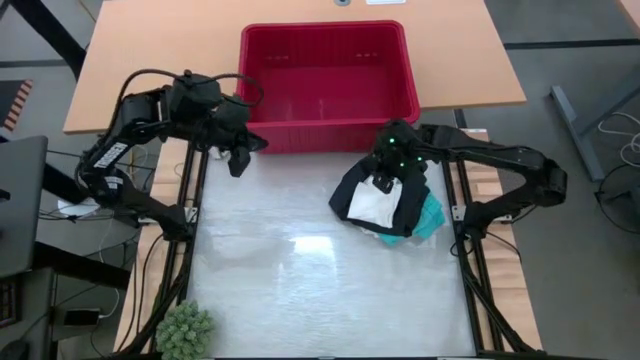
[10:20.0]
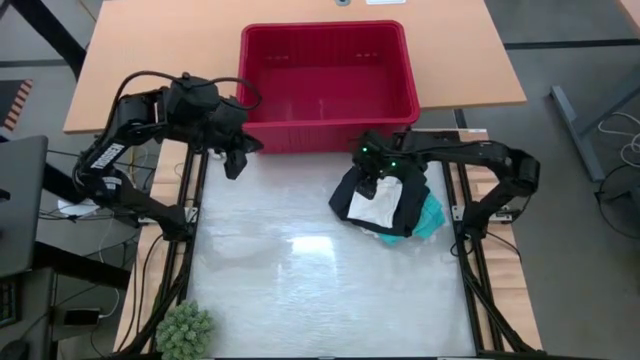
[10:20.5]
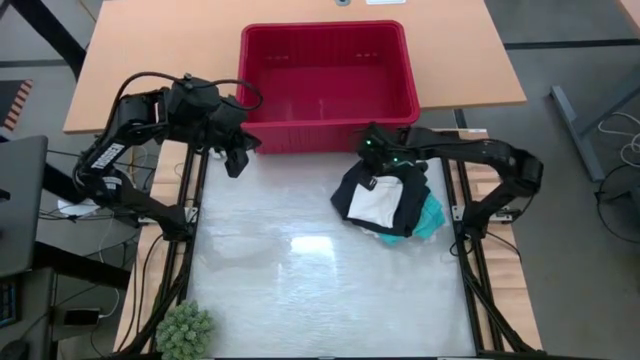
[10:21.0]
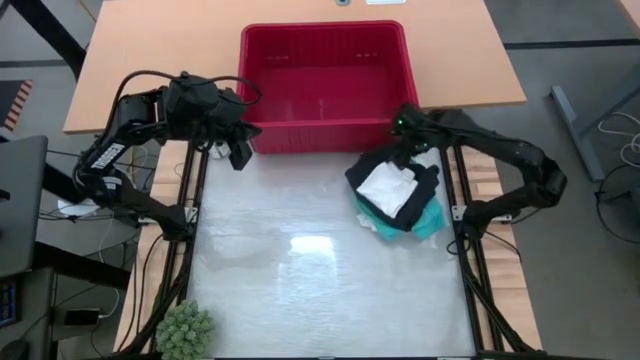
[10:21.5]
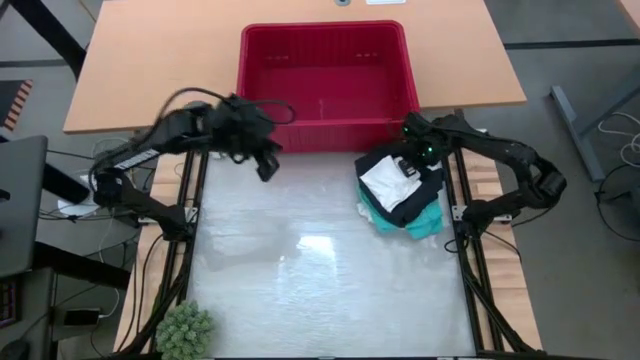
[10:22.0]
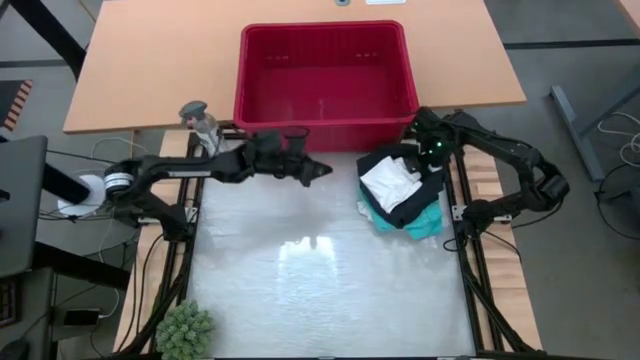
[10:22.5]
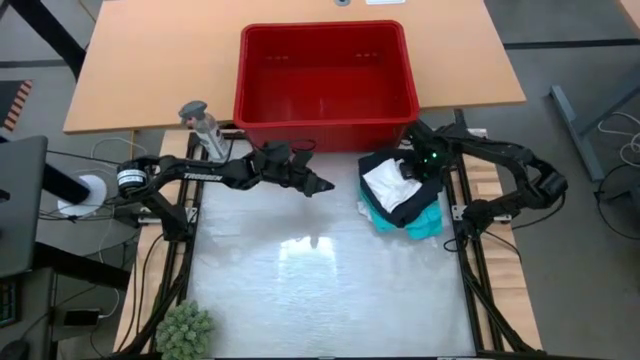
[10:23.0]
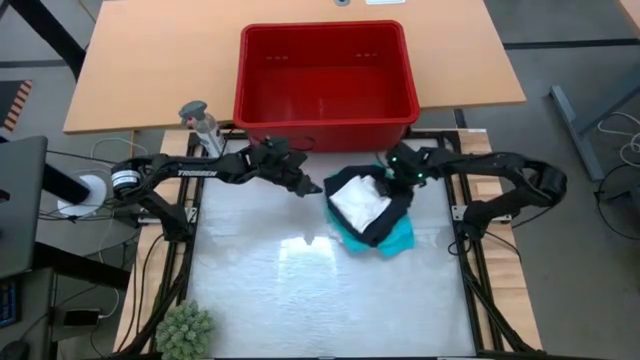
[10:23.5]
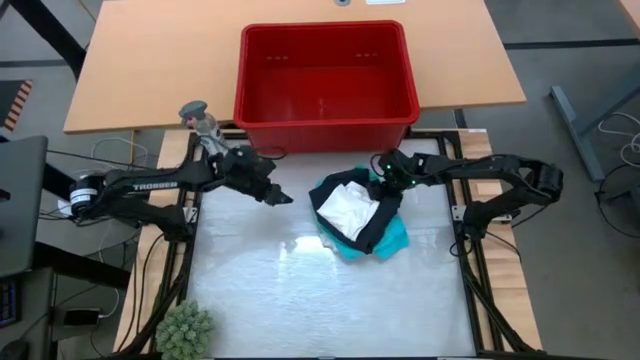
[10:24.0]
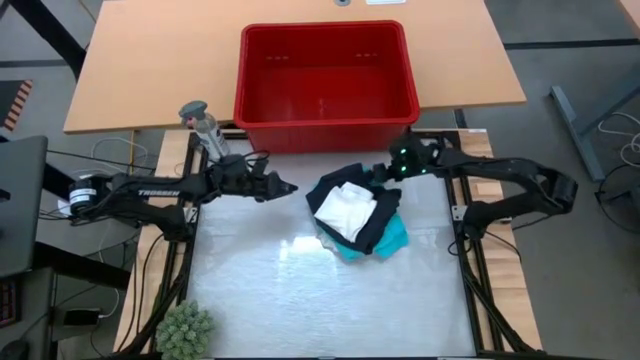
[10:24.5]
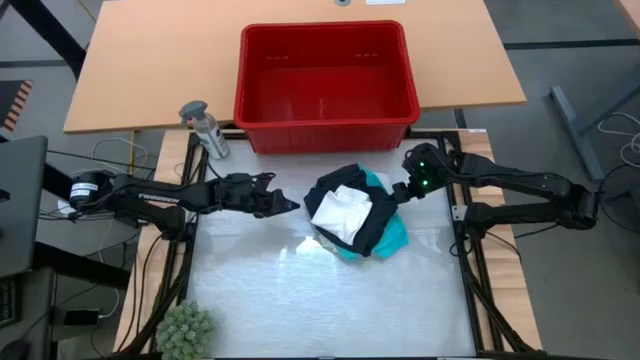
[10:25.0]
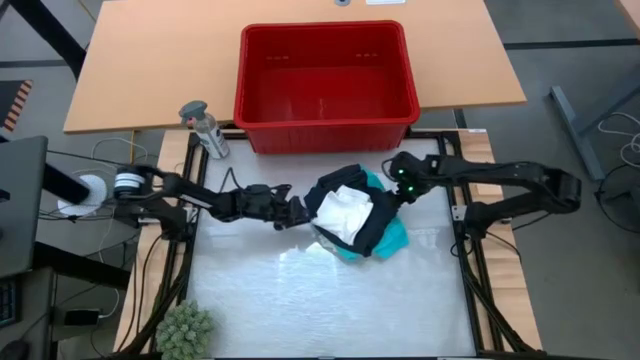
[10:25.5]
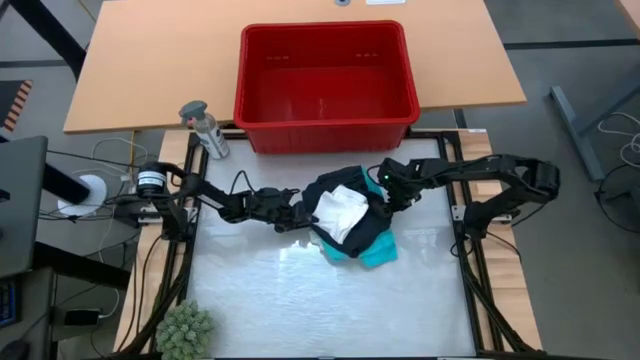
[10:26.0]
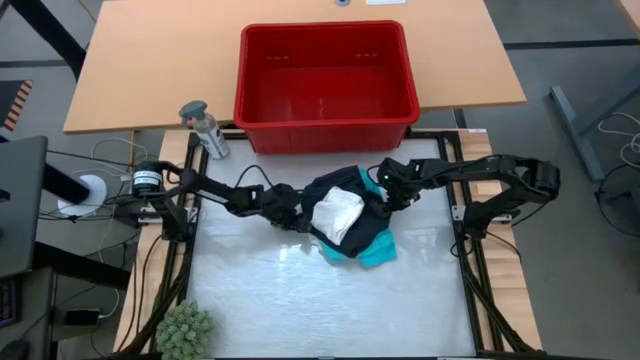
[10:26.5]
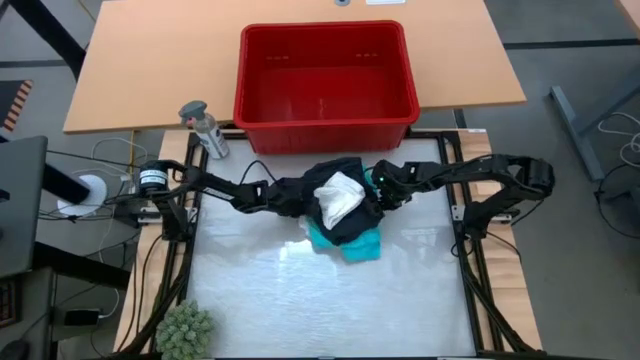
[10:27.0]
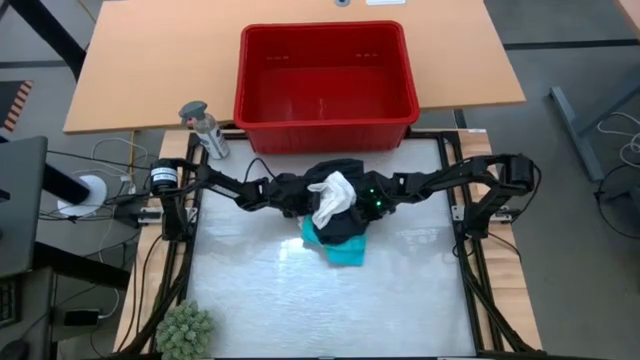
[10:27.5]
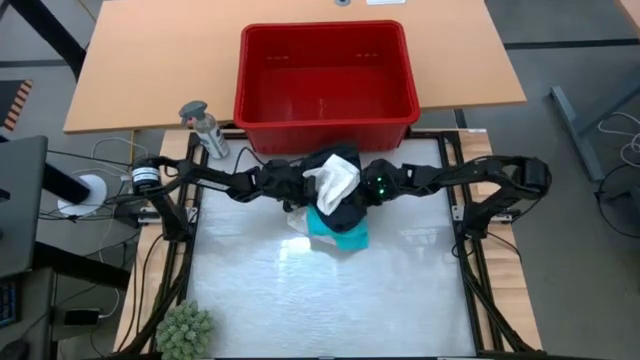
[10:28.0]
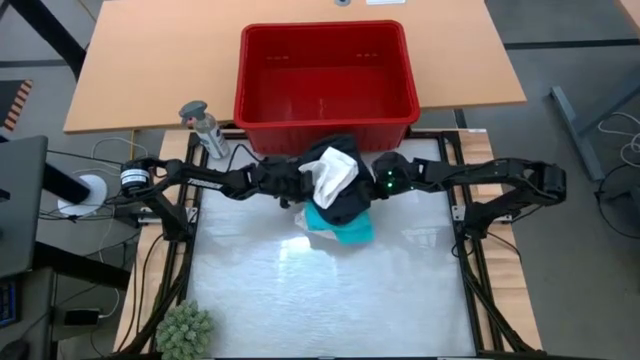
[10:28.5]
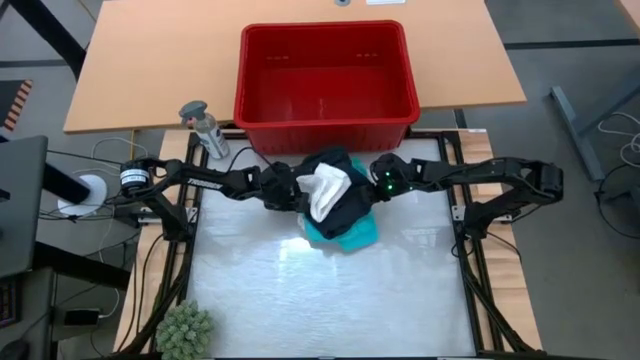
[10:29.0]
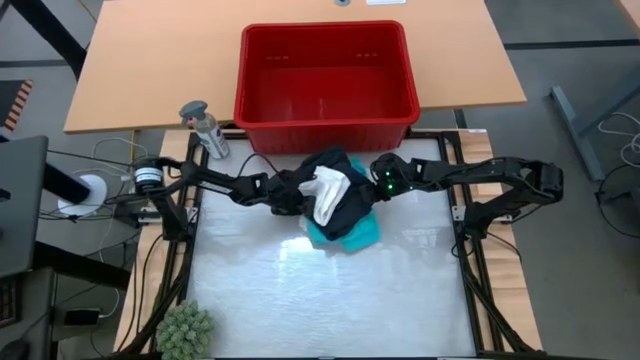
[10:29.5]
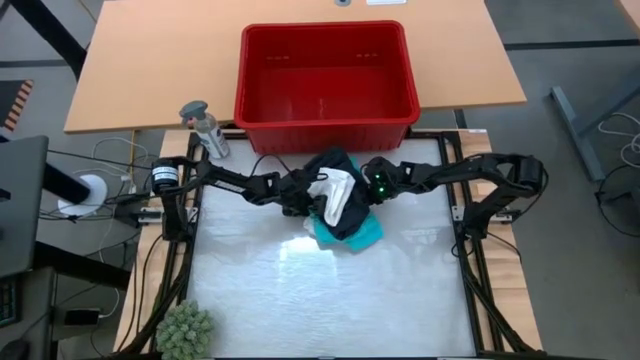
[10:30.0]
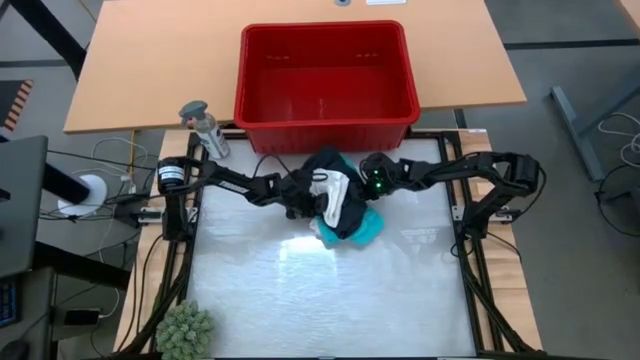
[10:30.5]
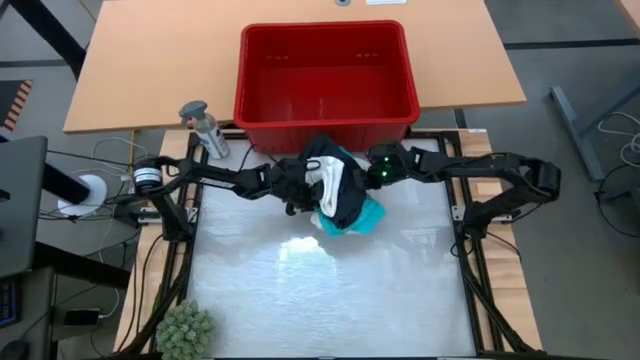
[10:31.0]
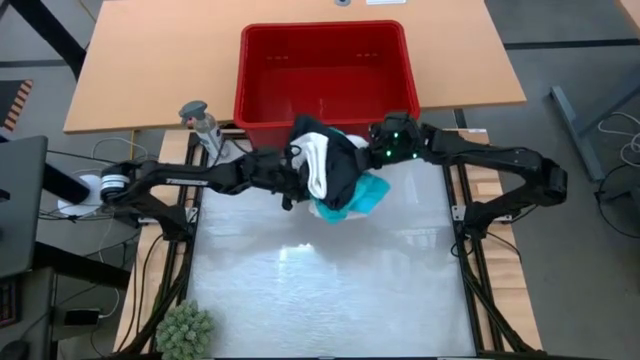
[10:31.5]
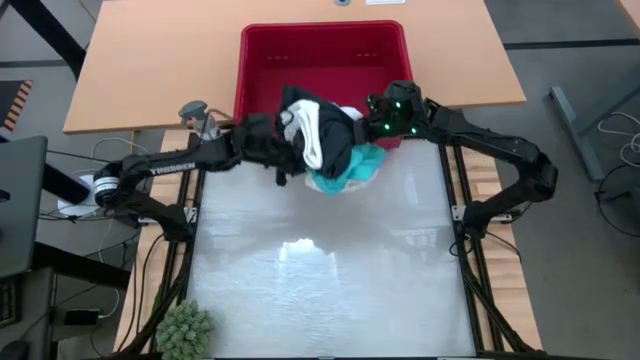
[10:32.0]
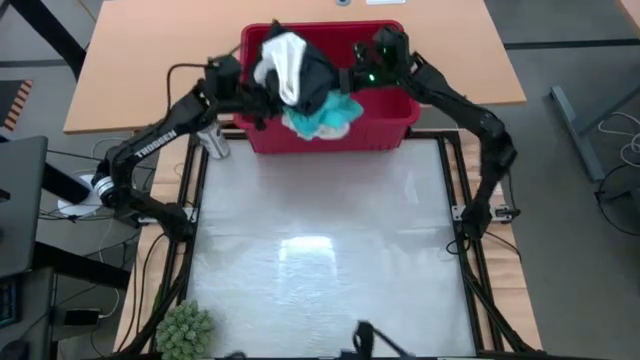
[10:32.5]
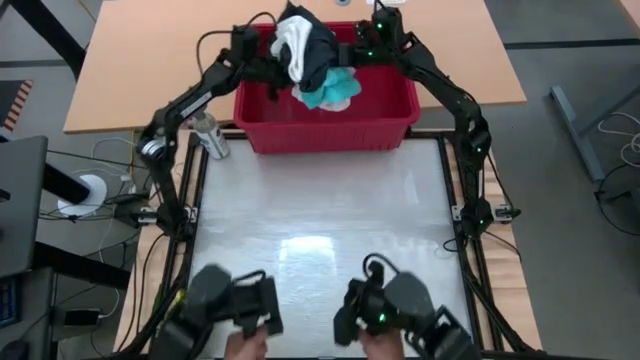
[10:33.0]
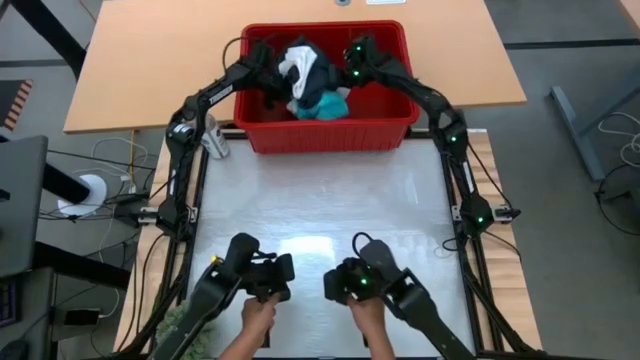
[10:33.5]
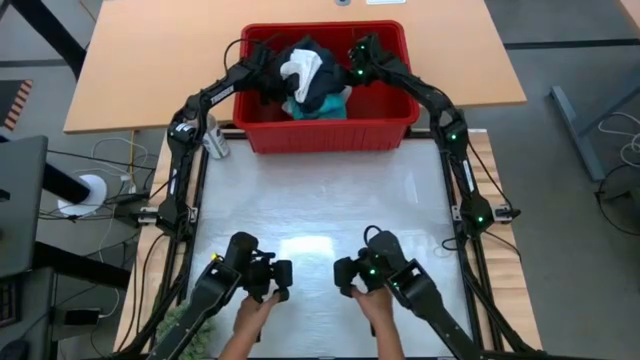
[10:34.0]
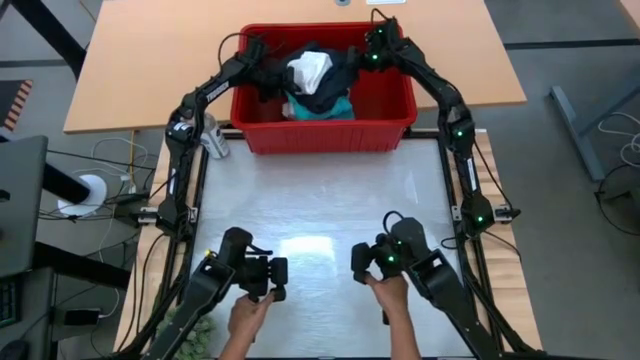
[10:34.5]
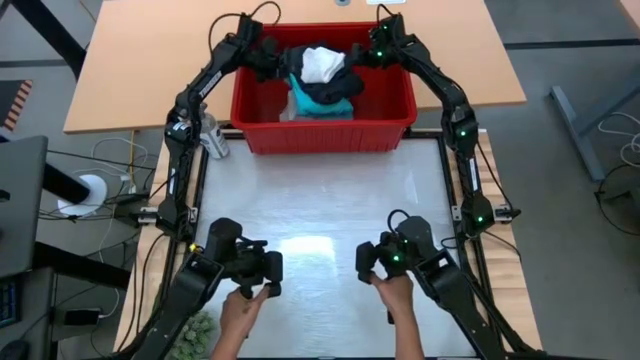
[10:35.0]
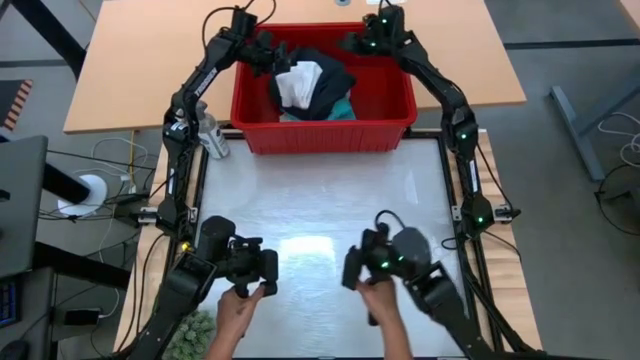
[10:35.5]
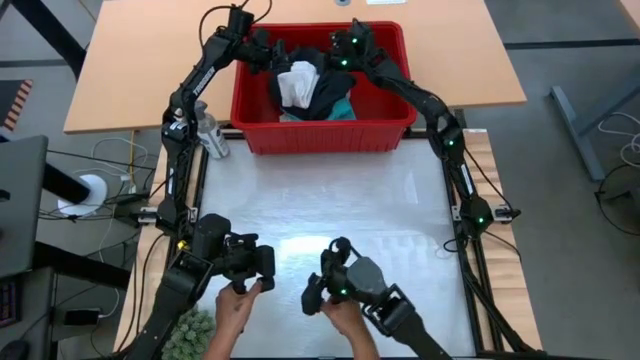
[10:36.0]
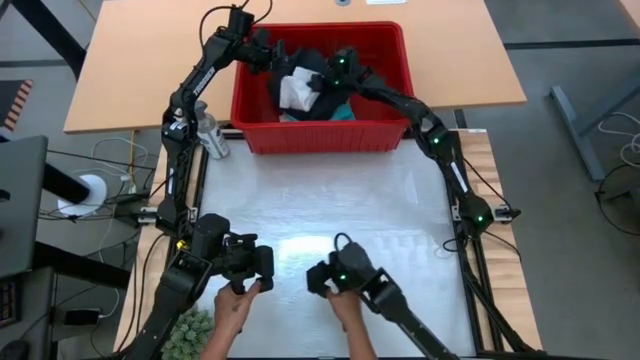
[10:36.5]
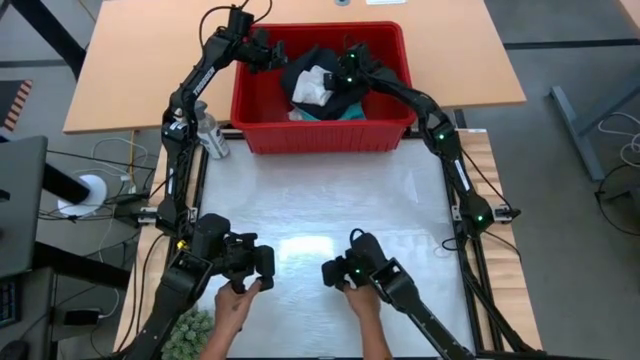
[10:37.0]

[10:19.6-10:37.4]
Task: Fold Laundry from Bin
Put the stacked clothes into the red bin
